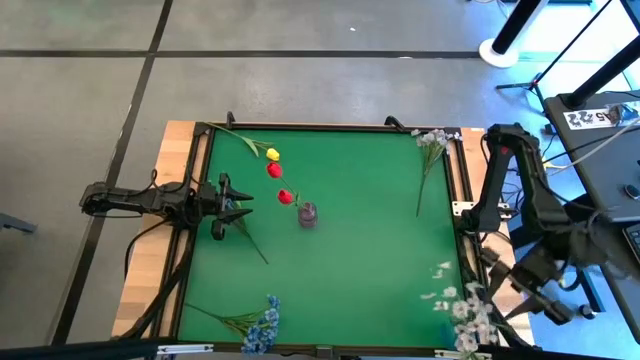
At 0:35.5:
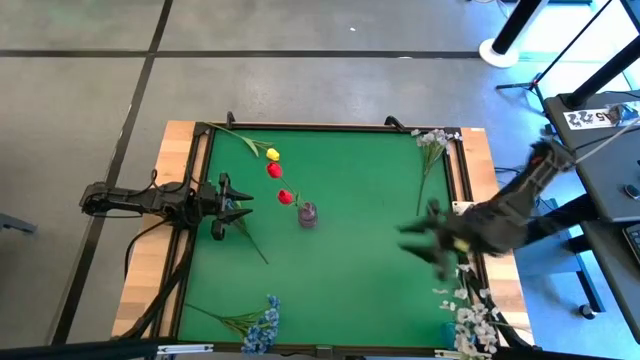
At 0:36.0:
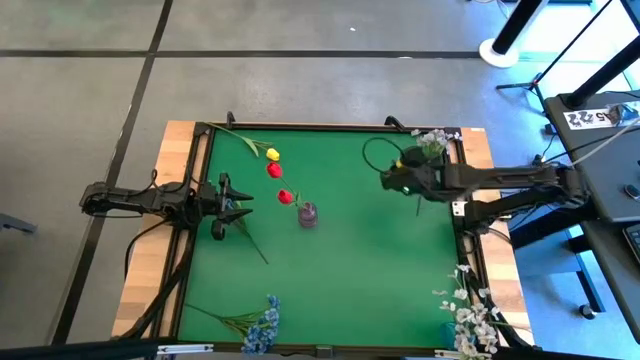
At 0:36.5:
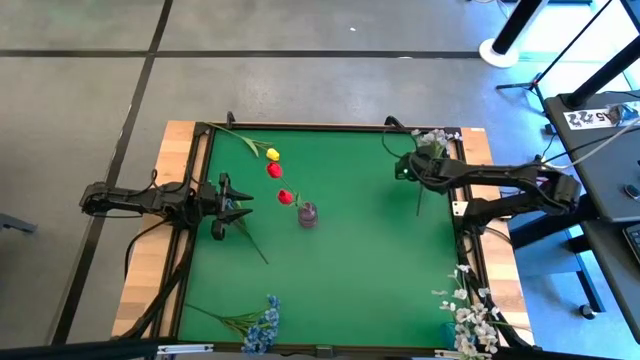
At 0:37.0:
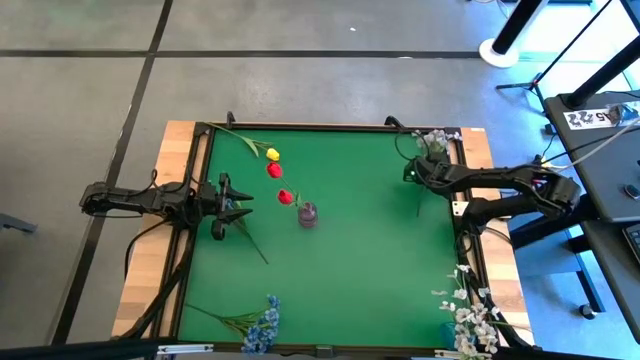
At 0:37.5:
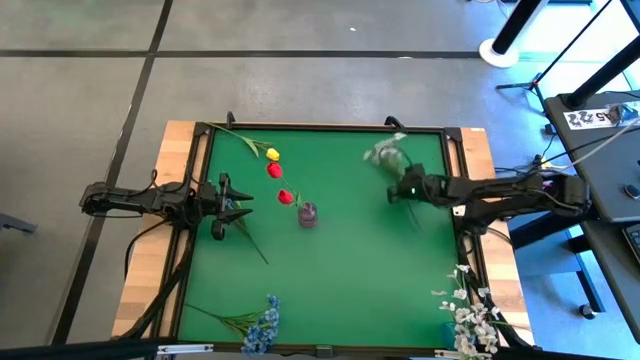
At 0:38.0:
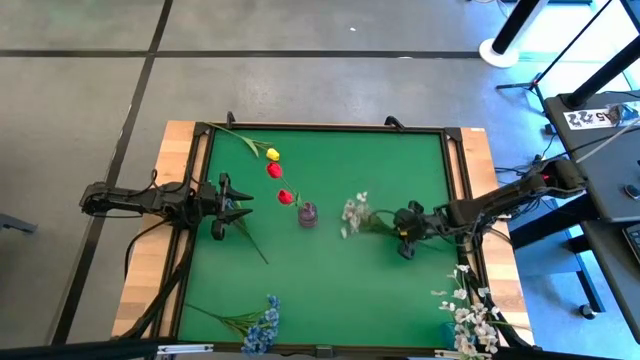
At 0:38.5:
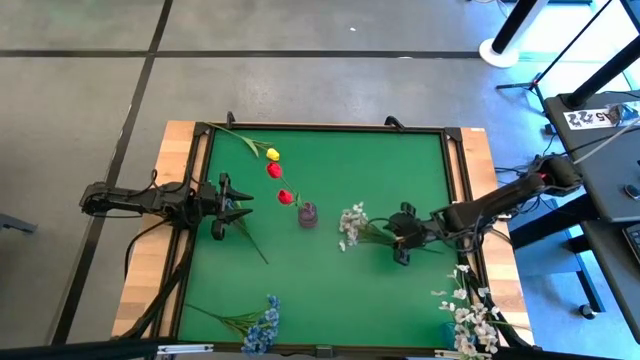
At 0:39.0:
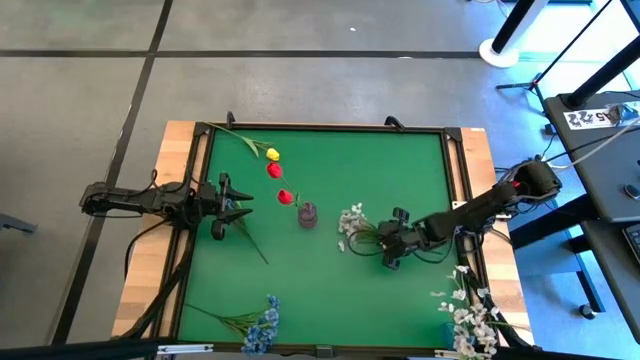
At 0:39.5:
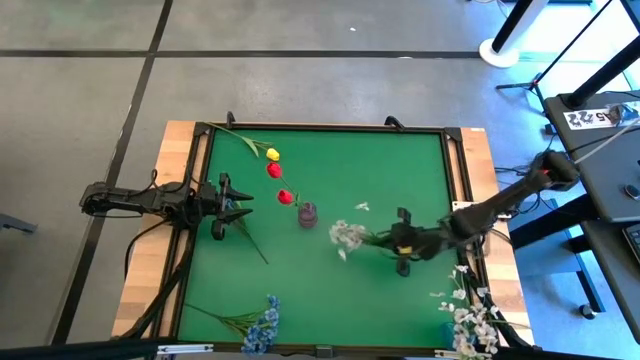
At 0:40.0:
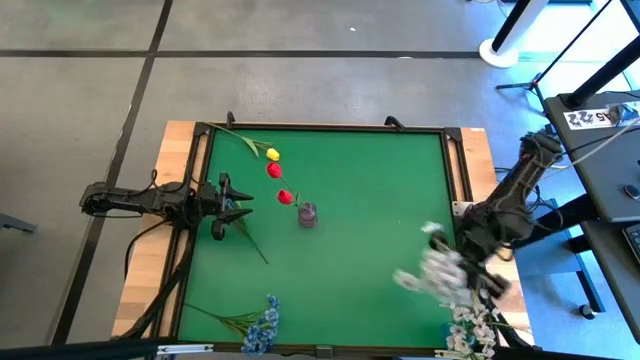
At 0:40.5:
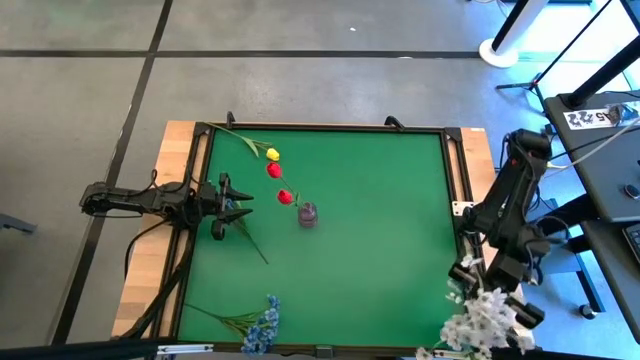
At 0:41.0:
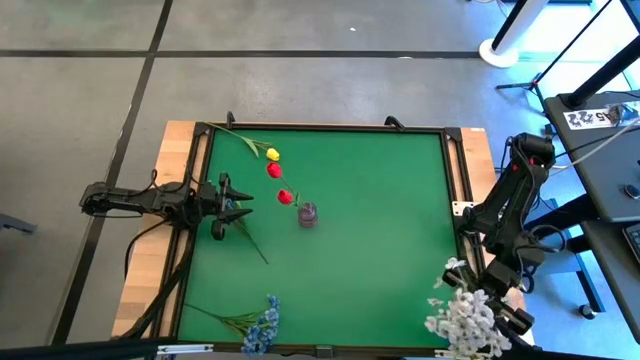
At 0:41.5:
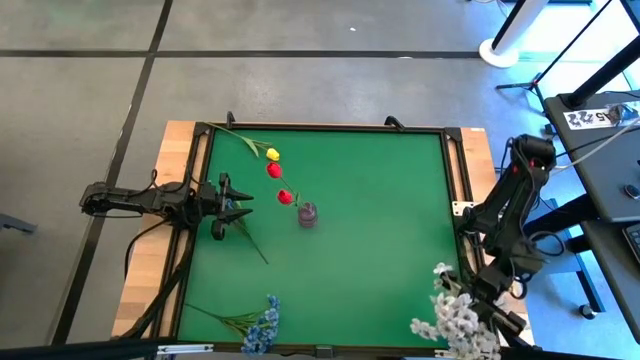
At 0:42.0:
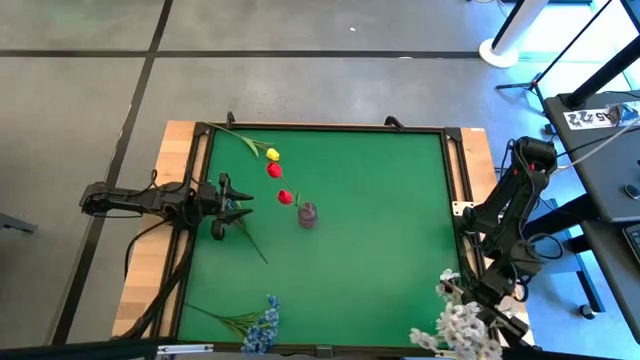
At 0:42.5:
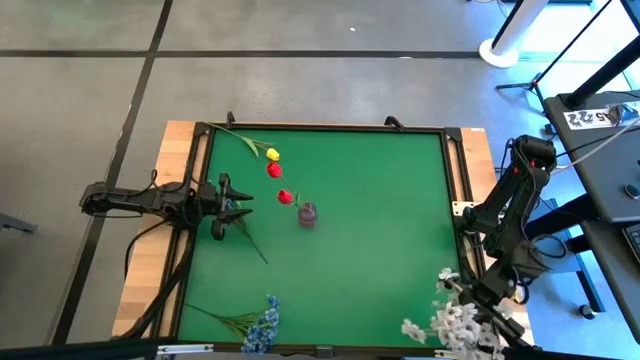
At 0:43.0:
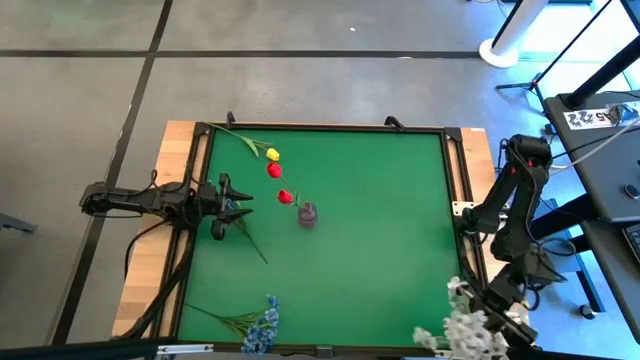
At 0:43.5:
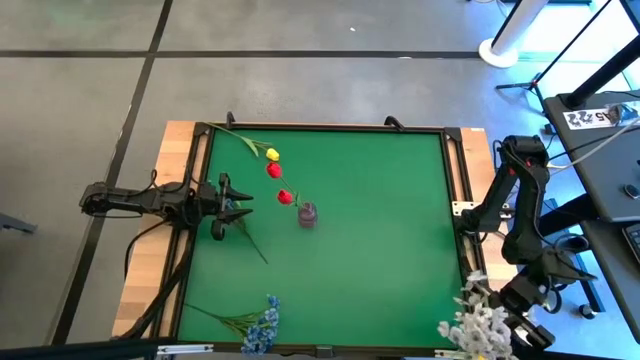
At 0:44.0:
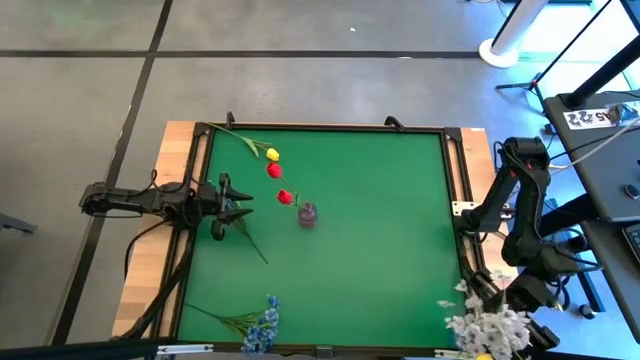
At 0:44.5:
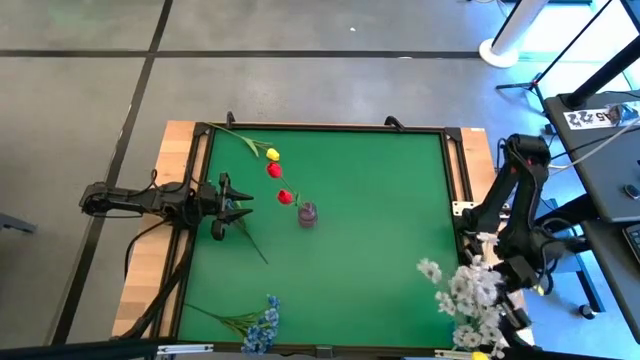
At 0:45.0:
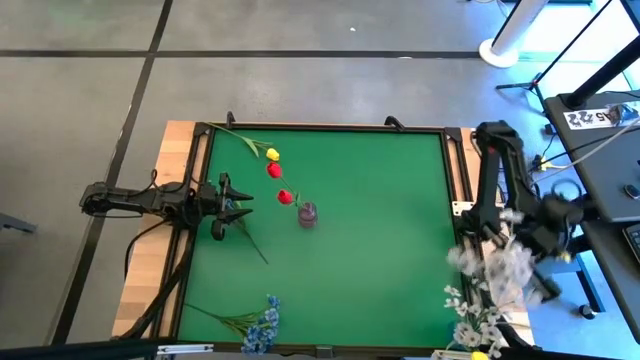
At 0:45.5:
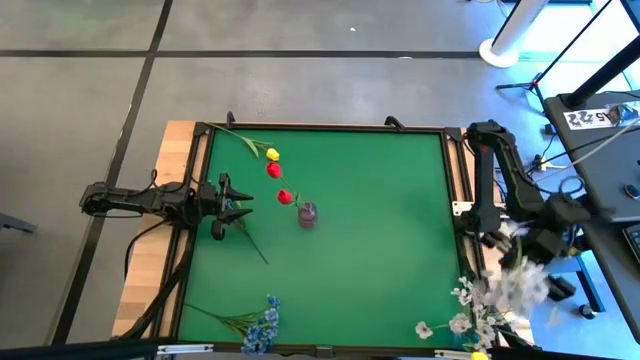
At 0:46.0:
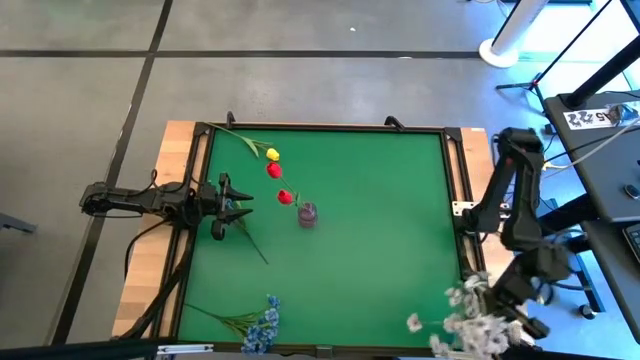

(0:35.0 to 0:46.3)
Task: Sort flowers into vase by color
Put the white flowers into the blue vase

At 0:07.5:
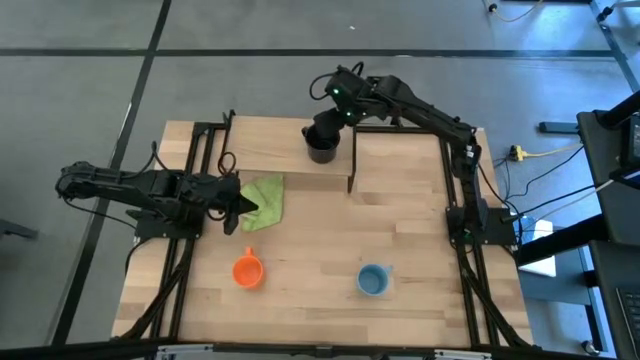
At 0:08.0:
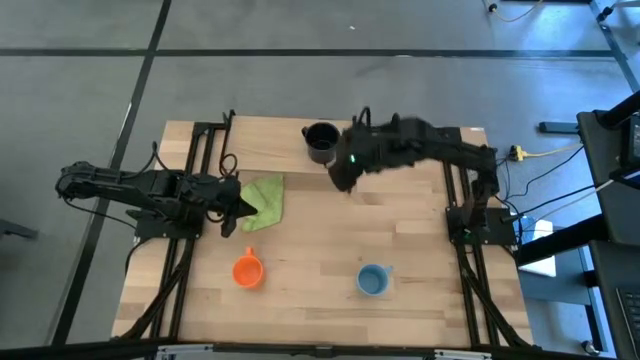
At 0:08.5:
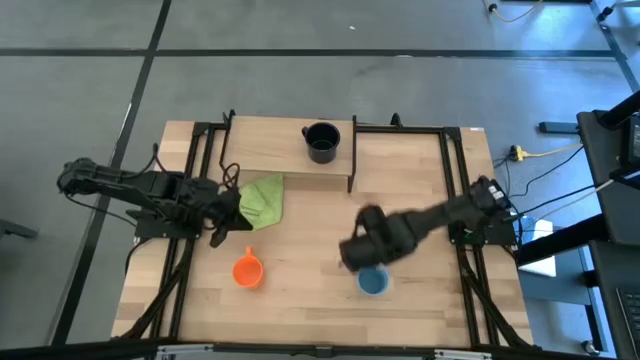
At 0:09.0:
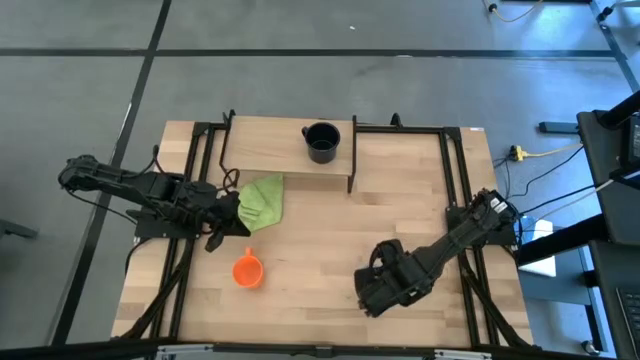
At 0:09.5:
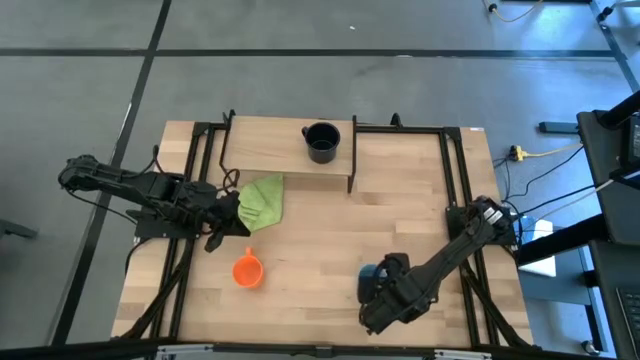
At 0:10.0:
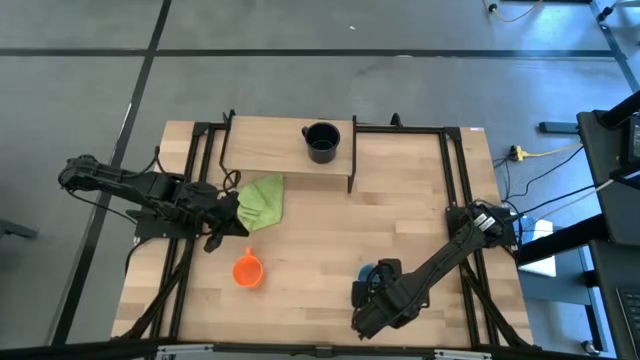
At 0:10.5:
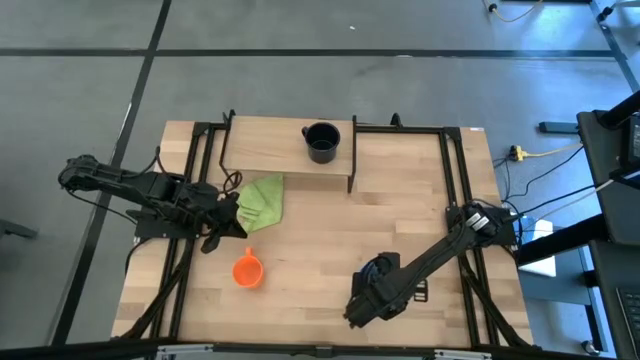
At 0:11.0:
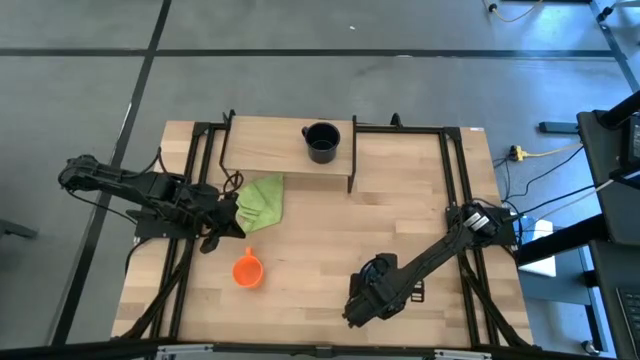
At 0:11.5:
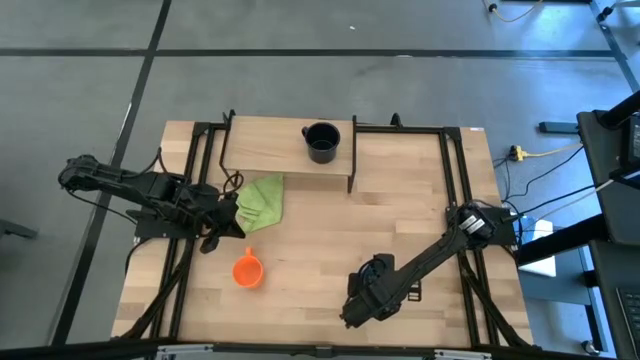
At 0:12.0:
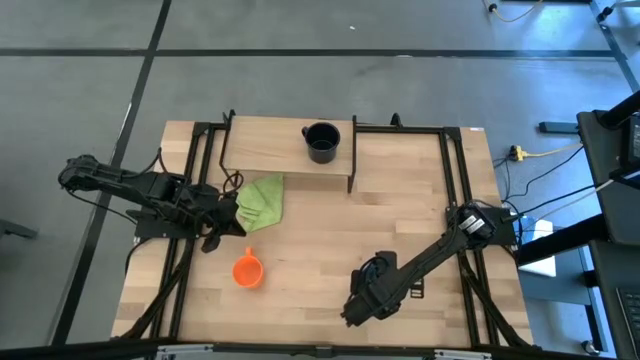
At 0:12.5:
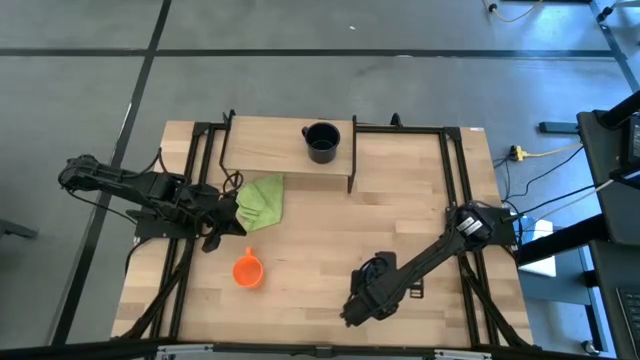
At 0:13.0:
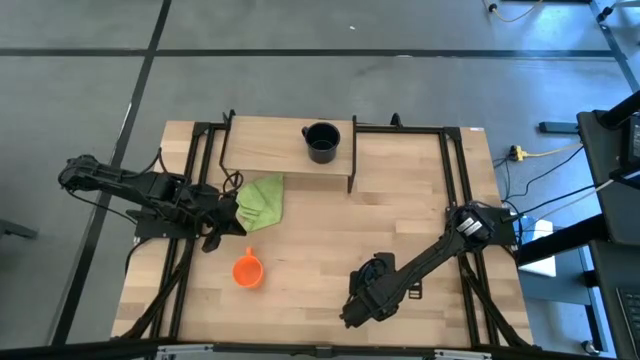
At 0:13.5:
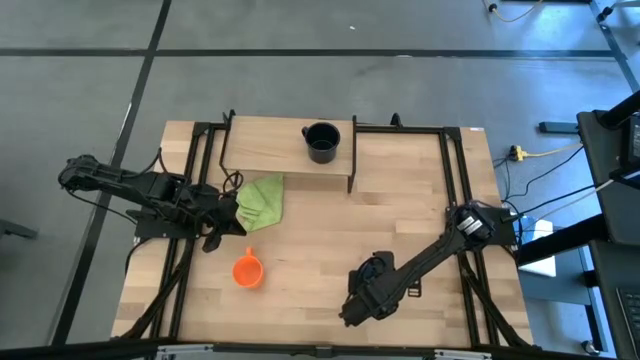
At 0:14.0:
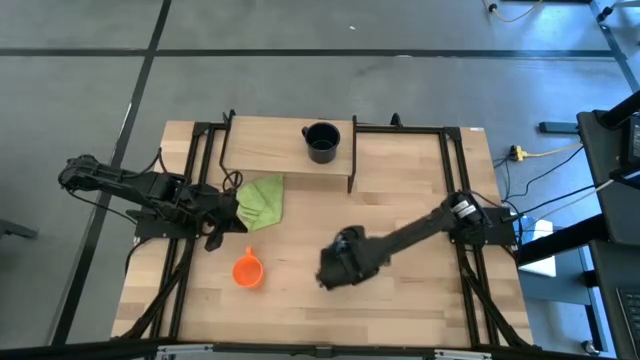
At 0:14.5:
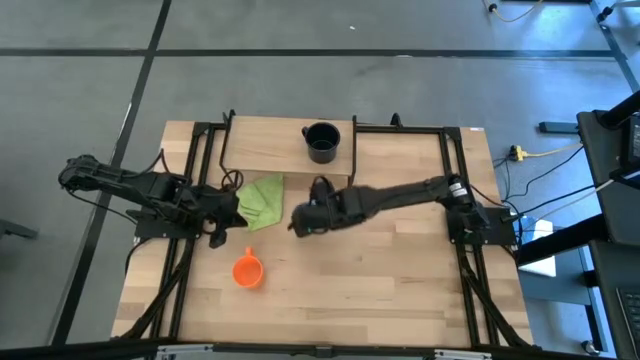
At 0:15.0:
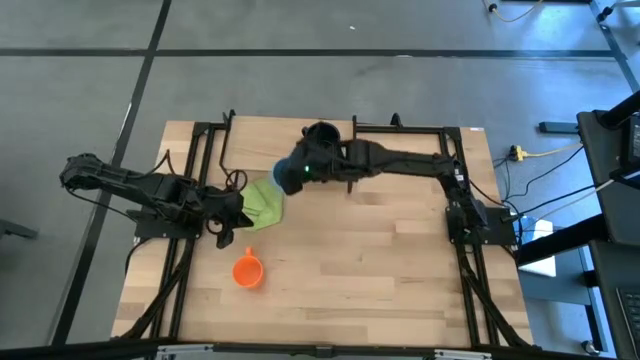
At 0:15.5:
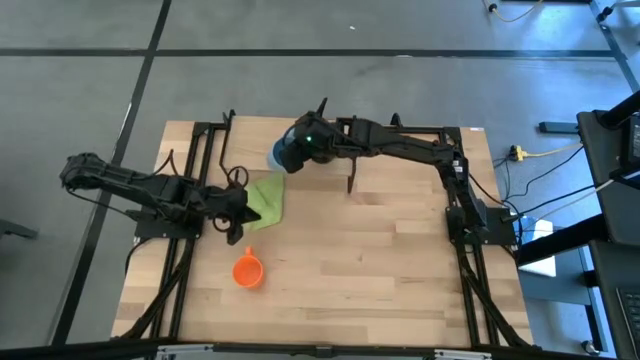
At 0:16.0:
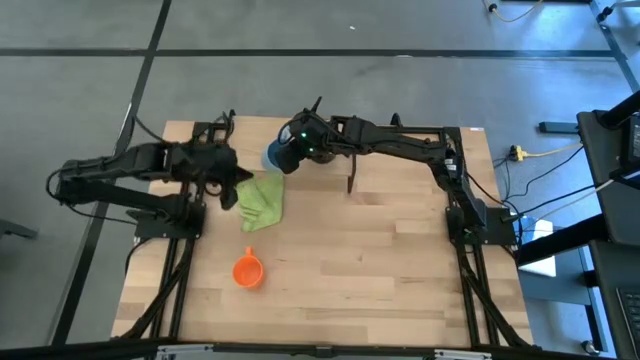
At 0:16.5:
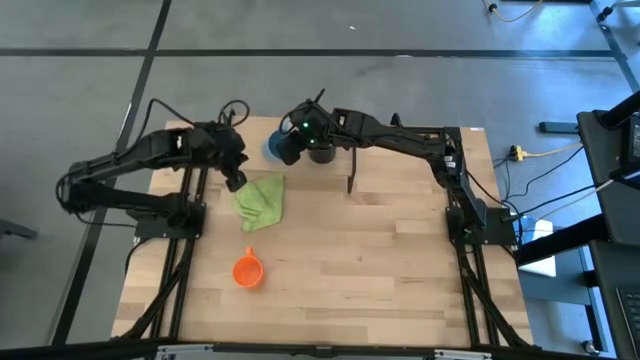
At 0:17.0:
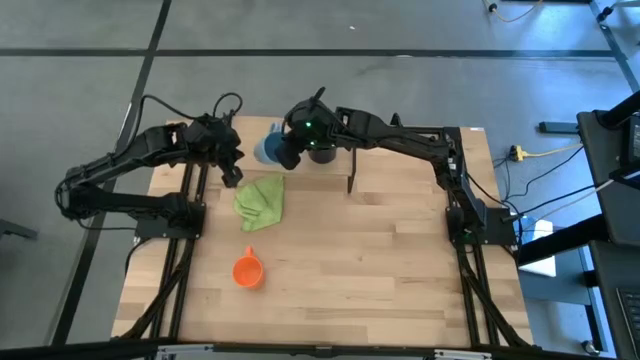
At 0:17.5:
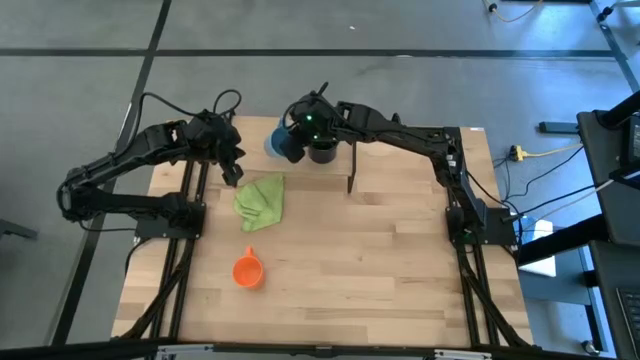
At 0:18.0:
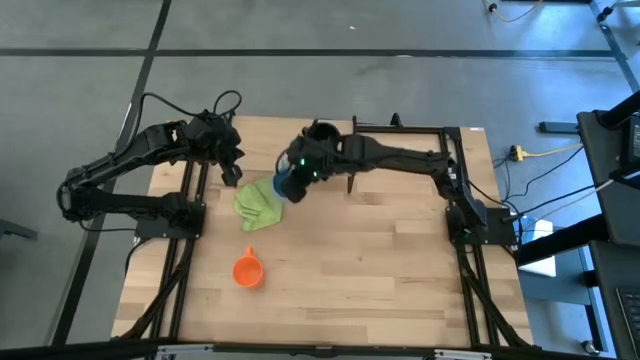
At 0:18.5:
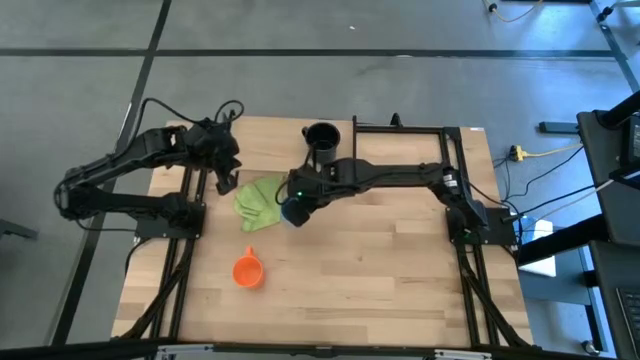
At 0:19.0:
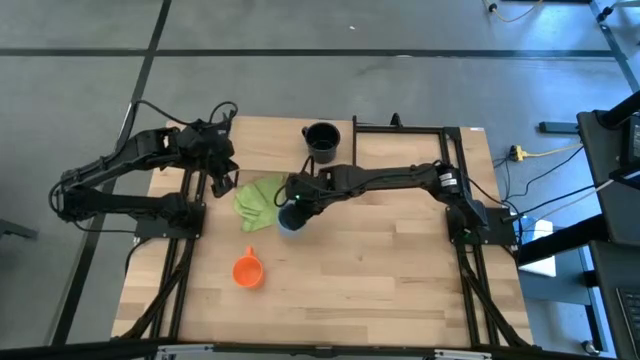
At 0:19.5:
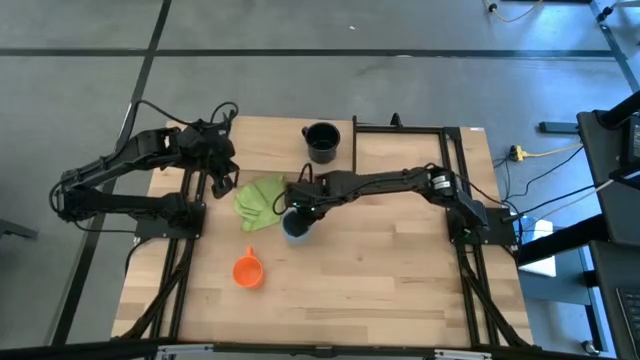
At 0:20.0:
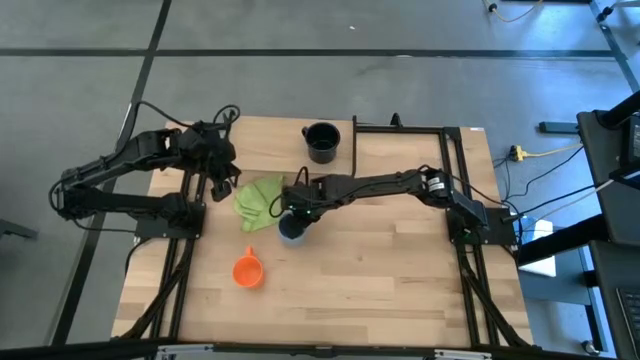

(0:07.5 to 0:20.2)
Task: Stack small to large cups/mugs on shelf
Put the blue mug on the shelf
